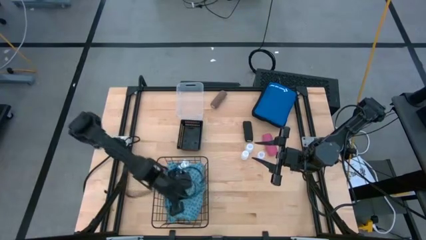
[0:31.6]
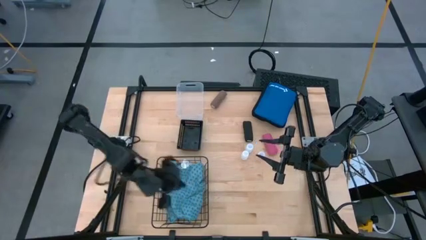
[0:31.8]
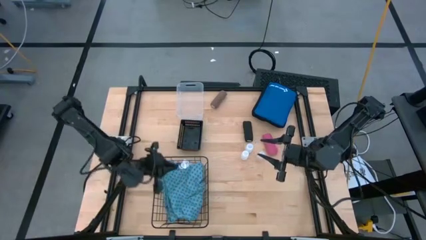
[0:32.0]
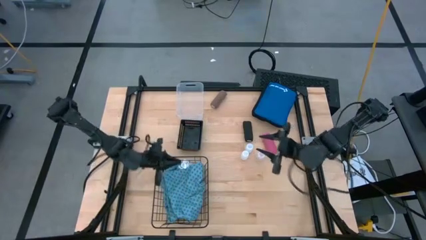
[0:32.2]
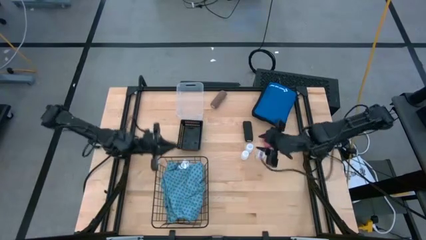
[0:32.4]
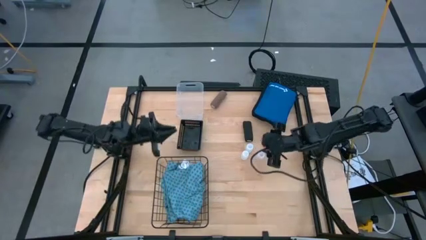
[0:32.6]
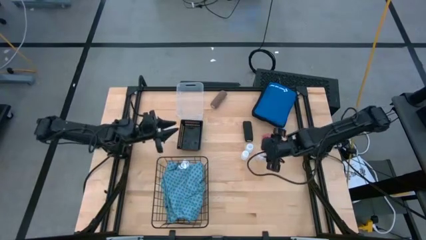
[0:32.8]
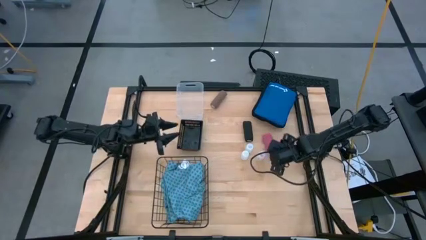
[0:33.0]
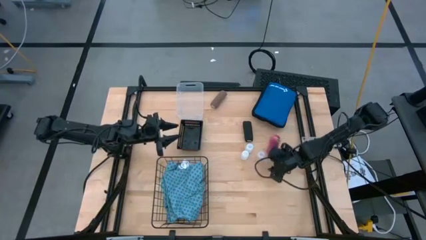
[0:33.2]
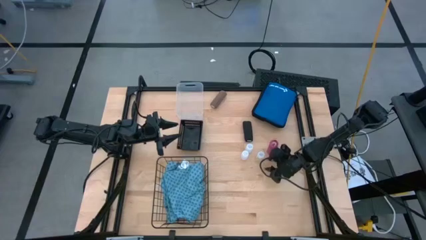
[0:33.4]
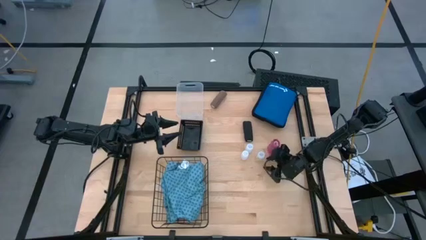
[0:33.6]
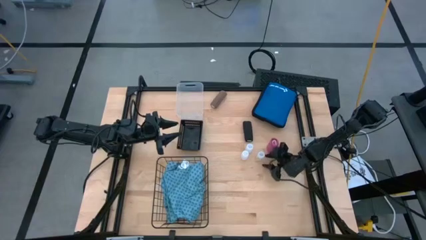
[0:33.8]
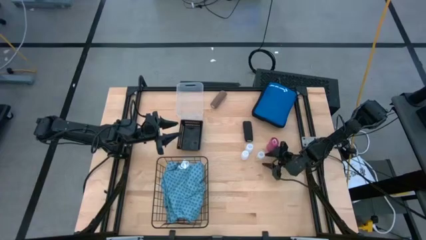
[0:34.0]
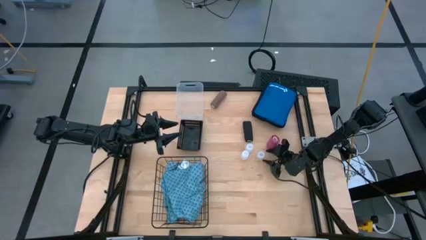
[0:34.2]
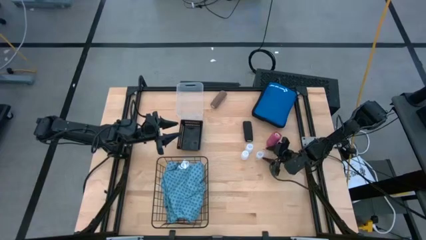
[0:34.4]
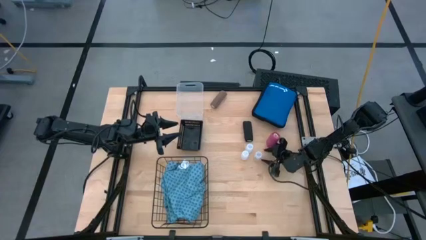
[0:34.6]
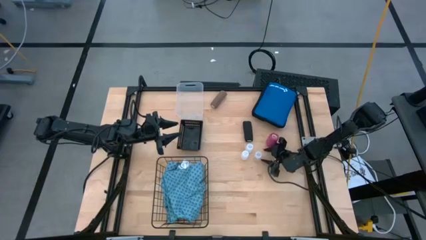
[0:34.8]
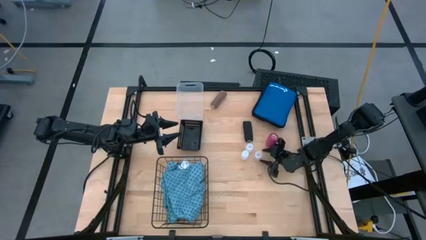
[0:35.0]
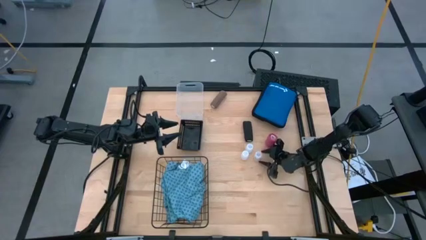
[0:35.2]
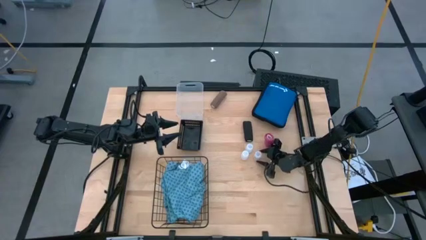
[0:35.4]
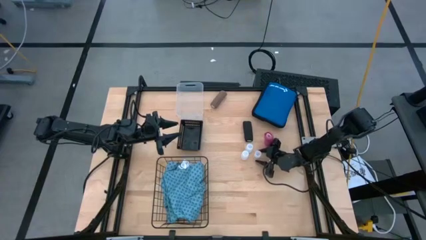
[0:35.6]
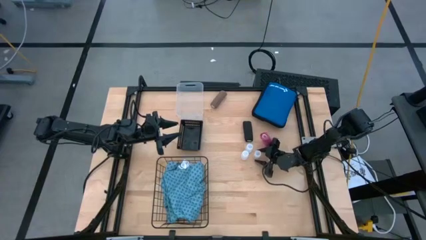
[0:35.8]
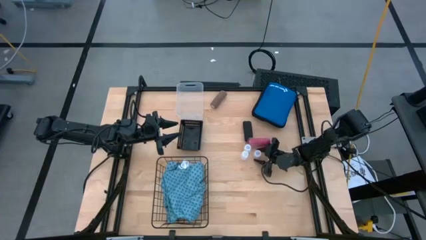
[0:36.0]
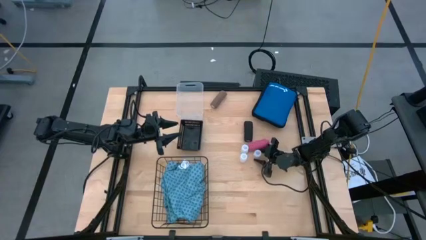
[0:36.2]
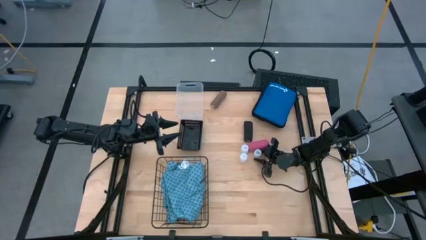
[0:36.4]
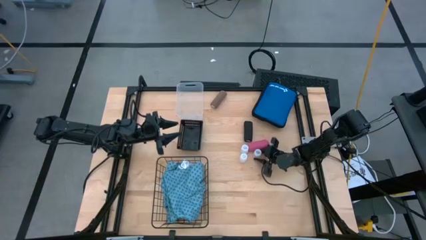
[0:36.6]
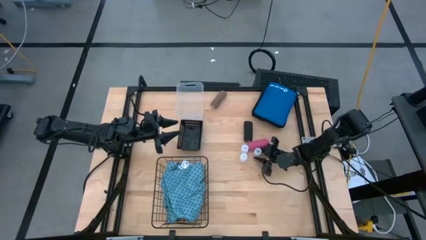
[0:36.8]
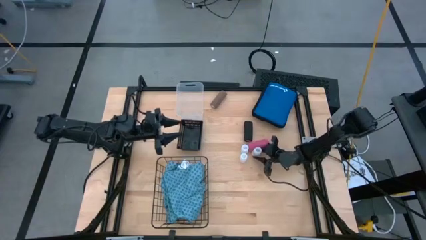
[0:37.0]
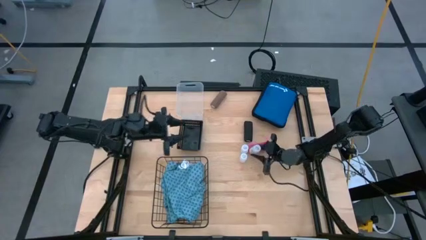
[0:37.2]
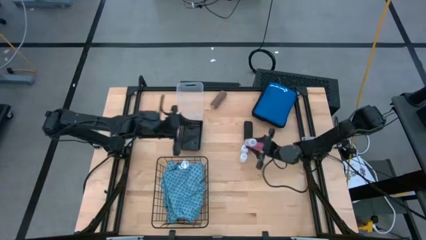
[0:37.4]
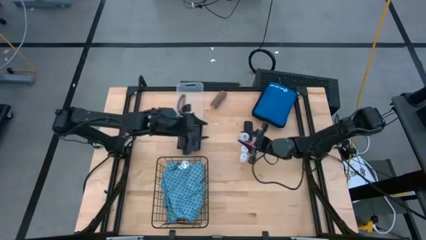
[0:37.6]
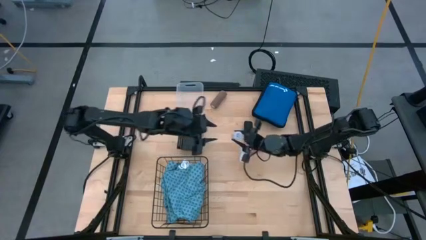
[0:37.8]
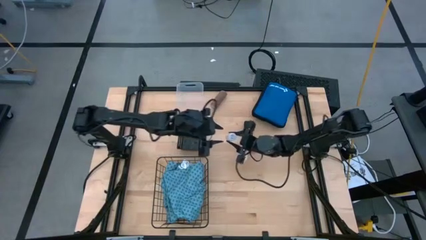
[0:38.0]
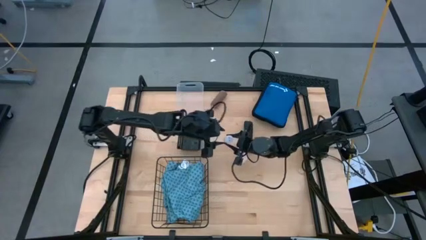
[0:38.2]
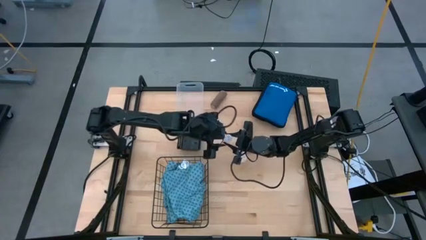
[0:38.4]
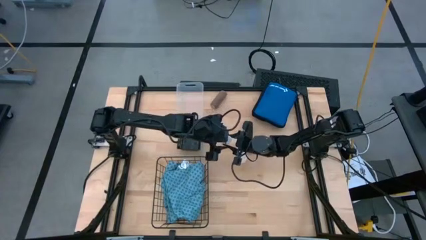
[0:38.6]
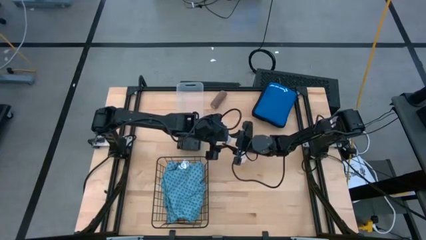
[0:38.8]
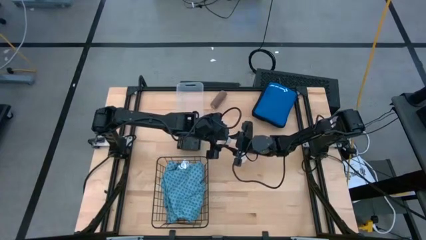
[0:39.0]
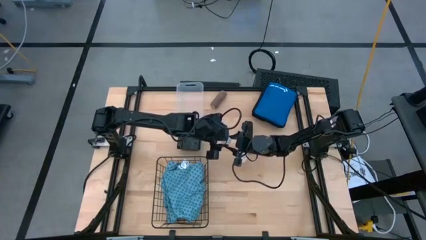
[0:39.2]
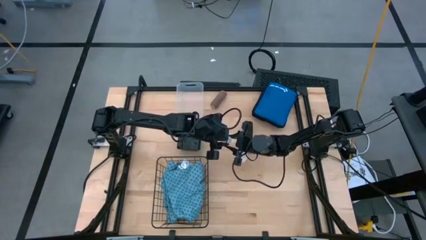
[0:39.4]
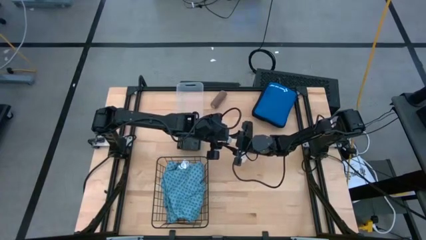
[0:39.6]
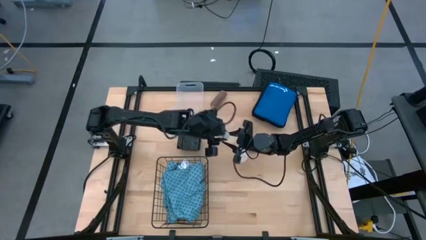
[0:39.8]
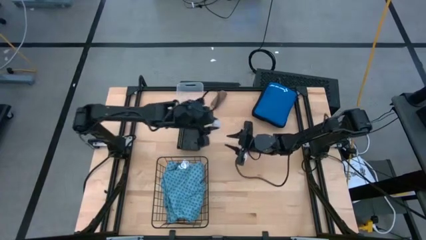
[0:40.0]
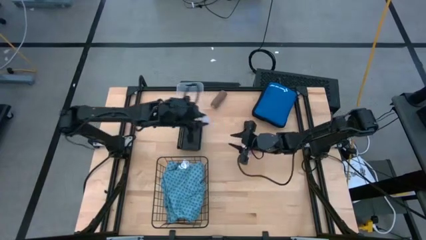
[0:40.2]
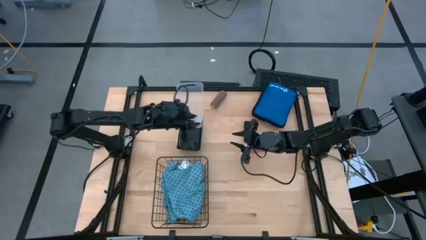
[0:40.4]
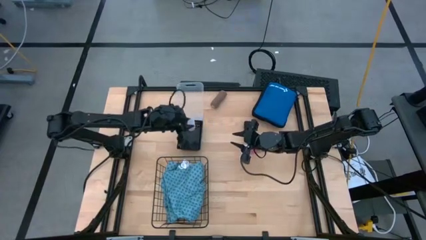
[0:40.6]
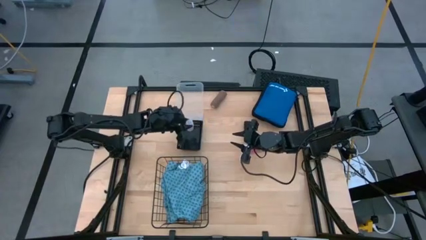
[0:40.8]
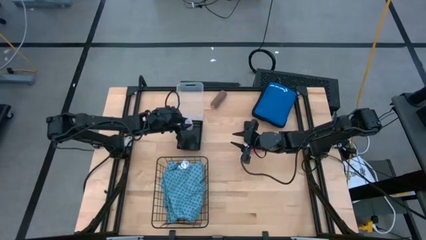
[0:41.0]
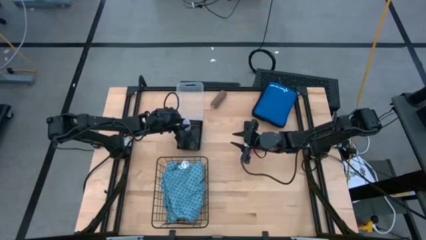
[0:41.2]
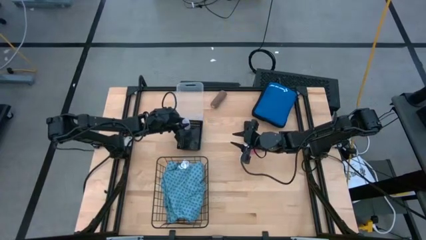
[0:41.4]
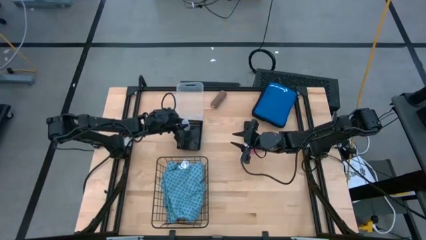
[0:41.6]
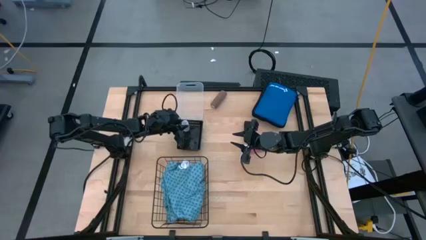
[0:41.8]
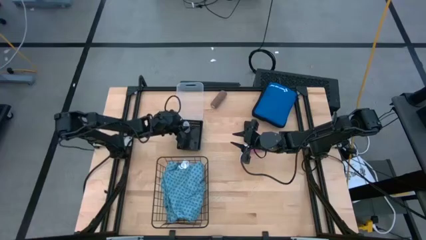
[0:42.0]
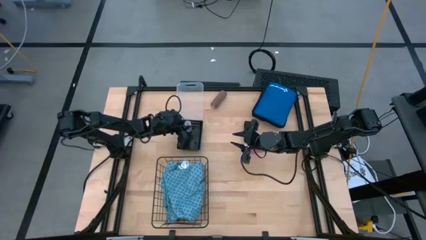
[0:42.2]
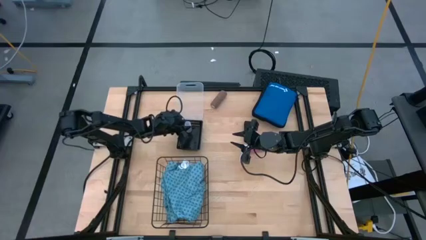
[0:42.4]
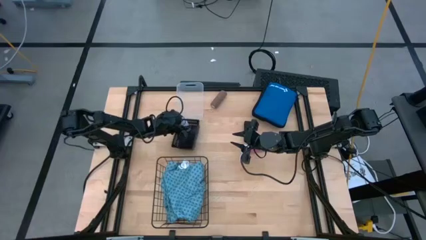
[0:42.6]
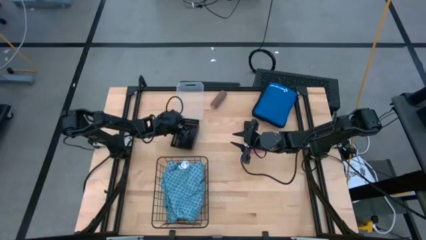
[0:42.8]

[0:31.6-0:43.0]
Task: Pick & place medical supplies in basket/bin
Put the bottom right white pill bottle into the black bin
